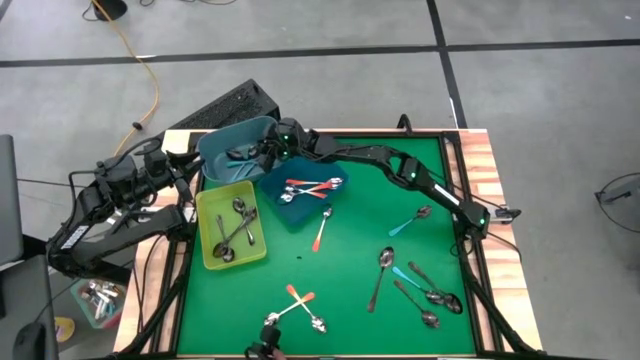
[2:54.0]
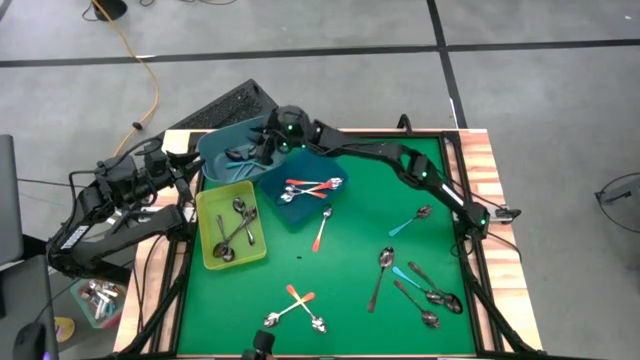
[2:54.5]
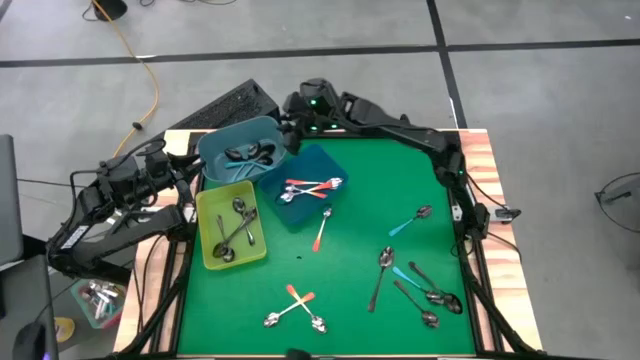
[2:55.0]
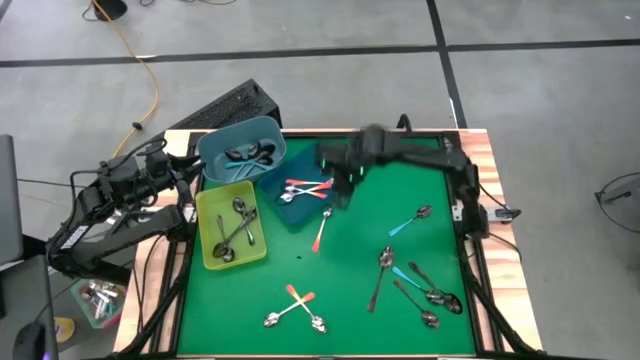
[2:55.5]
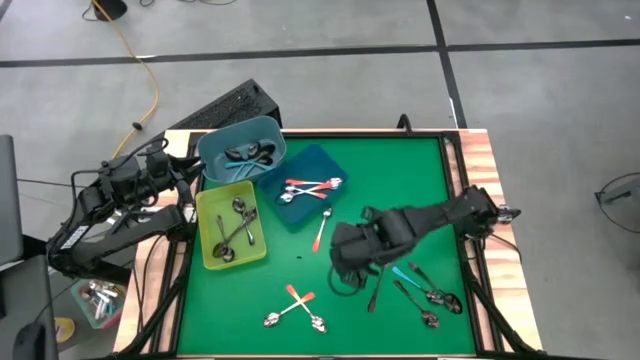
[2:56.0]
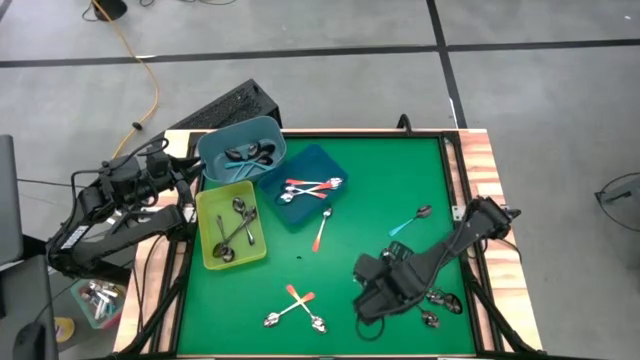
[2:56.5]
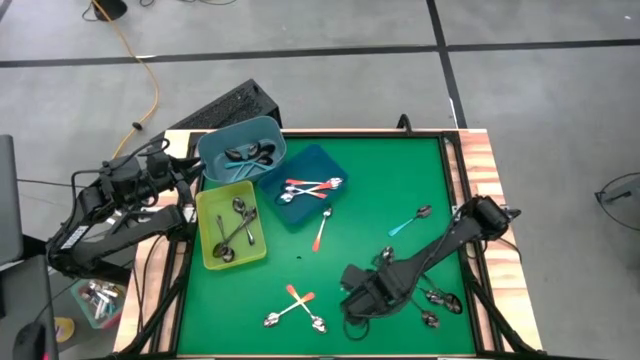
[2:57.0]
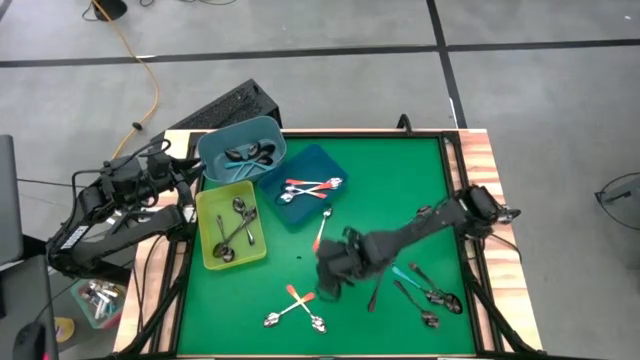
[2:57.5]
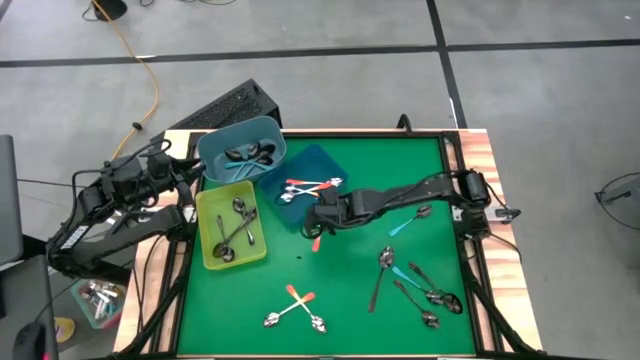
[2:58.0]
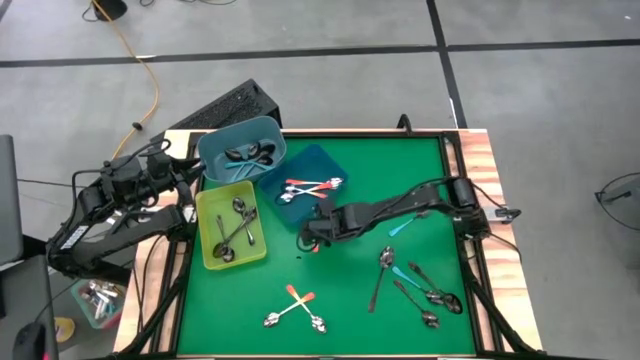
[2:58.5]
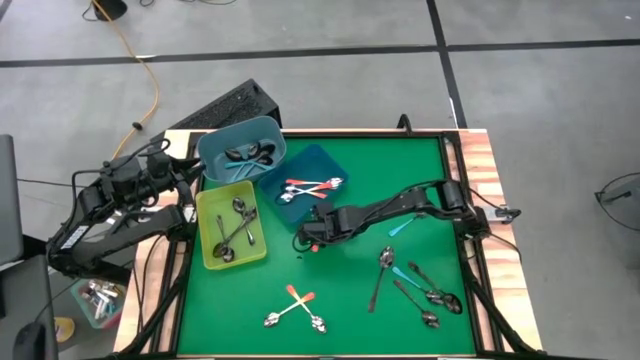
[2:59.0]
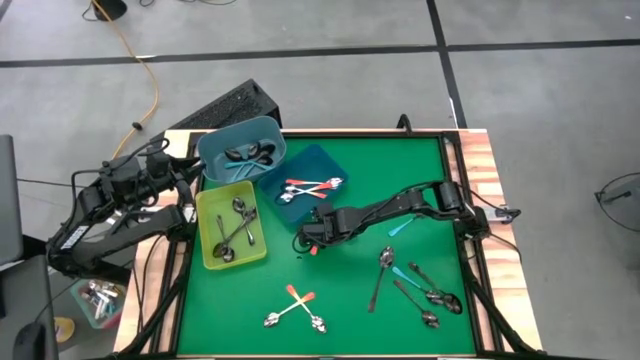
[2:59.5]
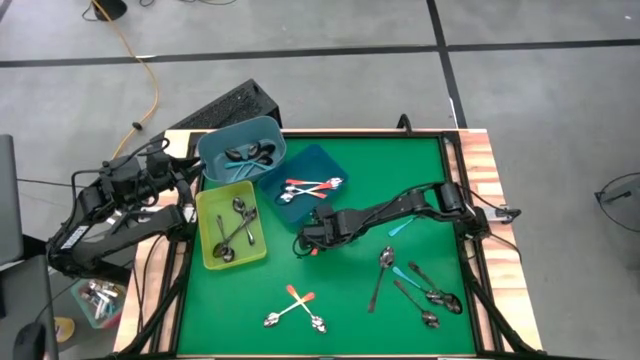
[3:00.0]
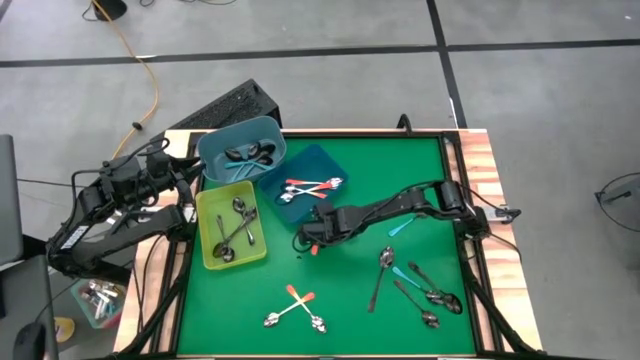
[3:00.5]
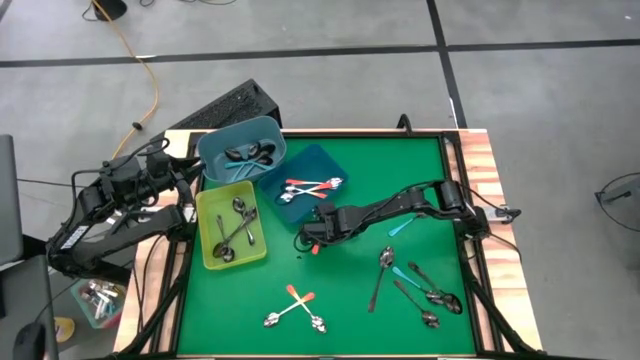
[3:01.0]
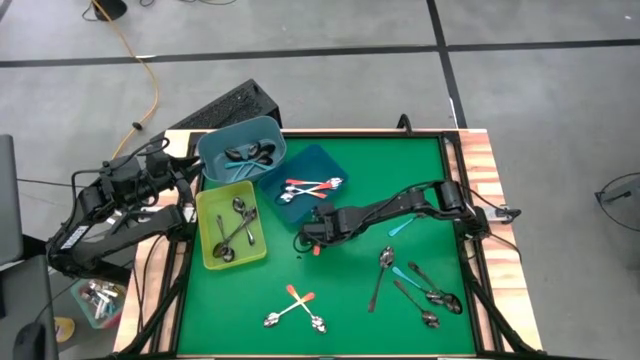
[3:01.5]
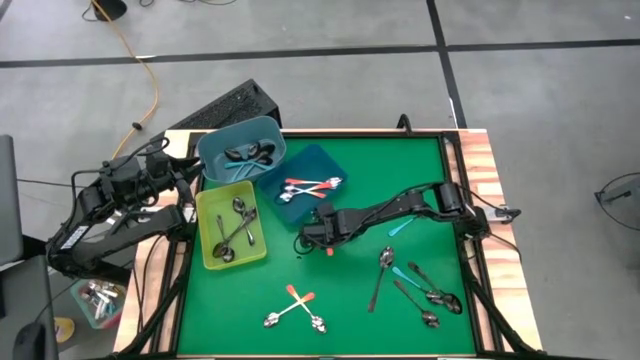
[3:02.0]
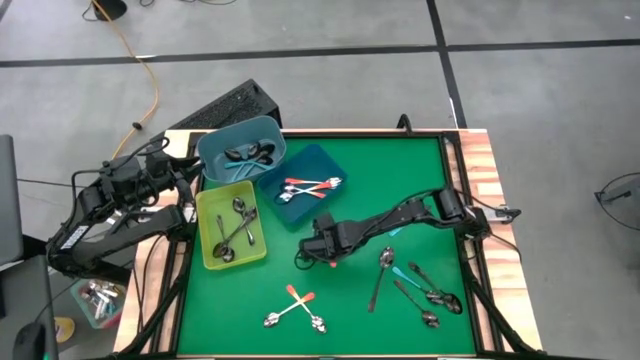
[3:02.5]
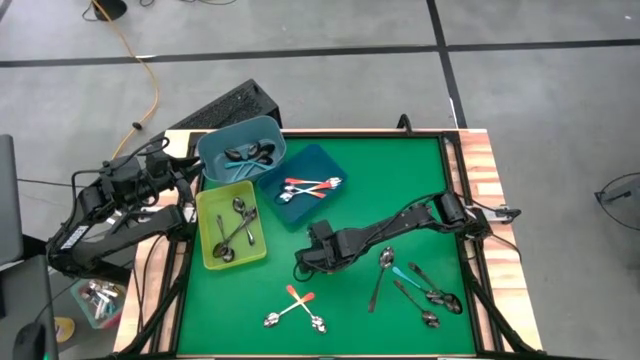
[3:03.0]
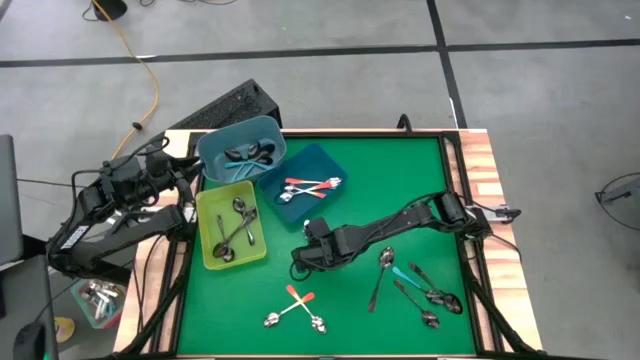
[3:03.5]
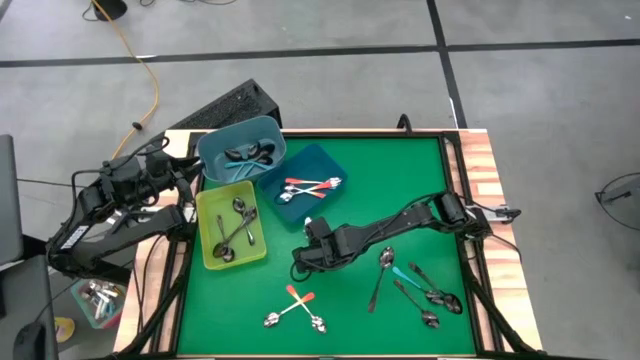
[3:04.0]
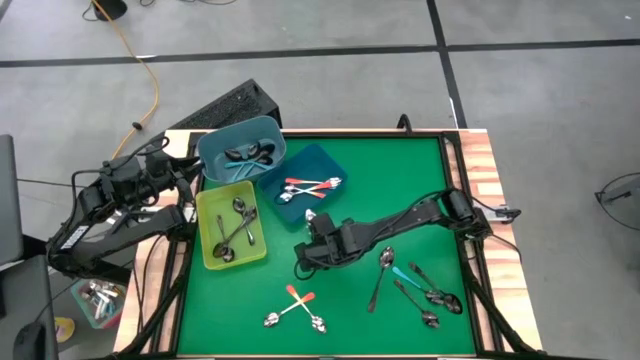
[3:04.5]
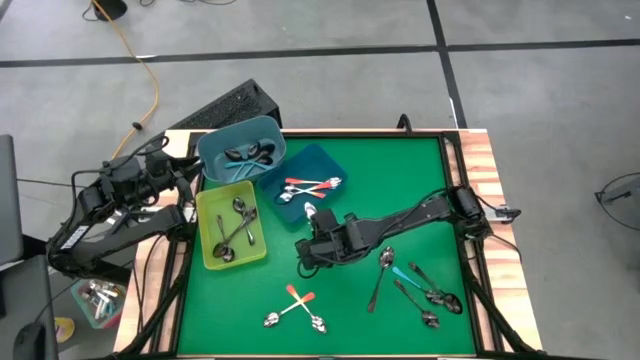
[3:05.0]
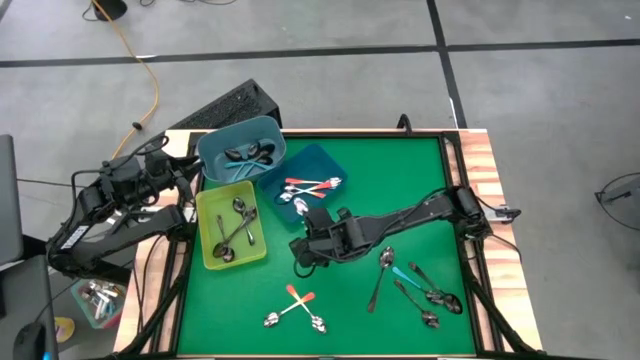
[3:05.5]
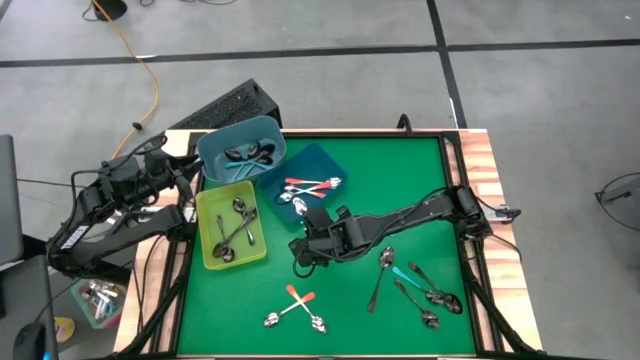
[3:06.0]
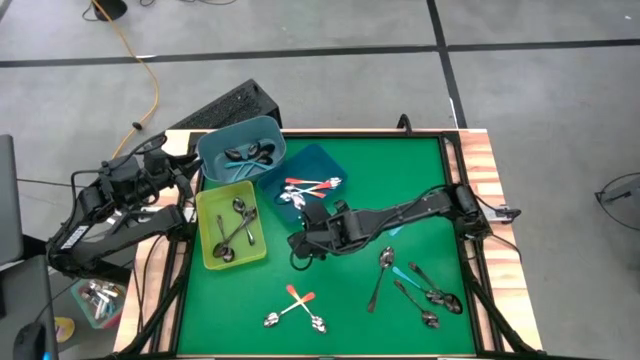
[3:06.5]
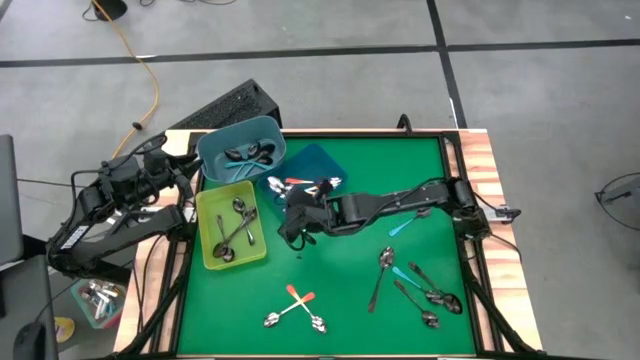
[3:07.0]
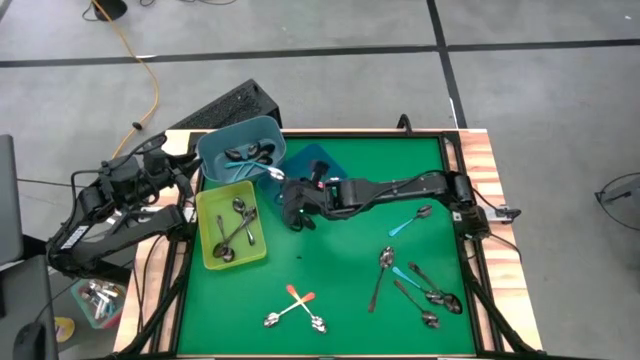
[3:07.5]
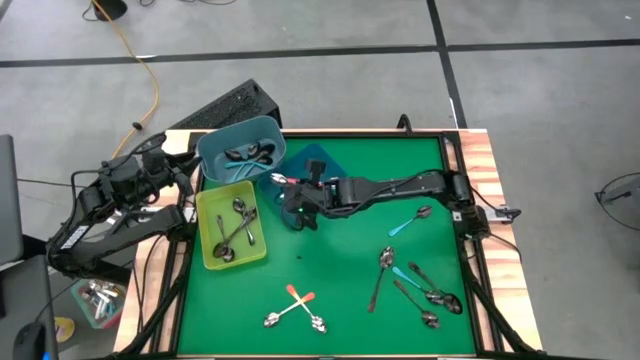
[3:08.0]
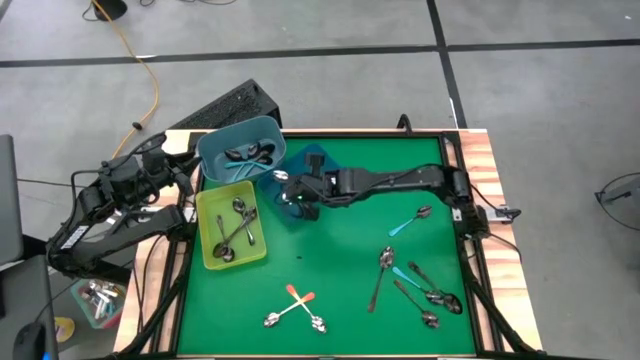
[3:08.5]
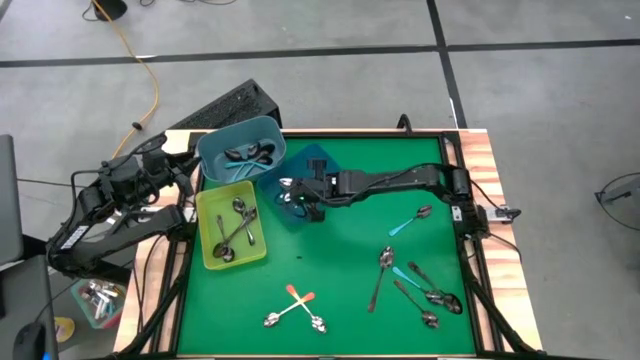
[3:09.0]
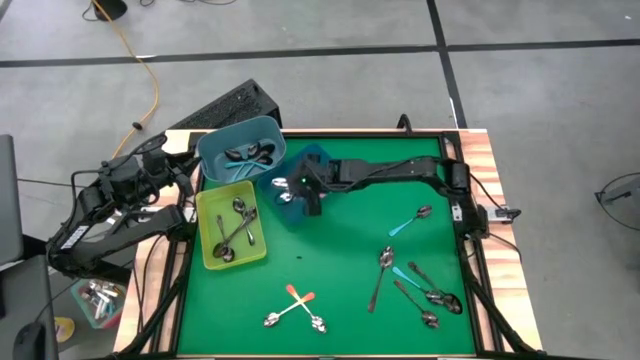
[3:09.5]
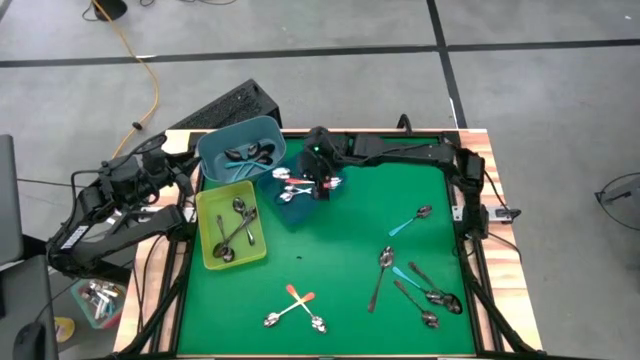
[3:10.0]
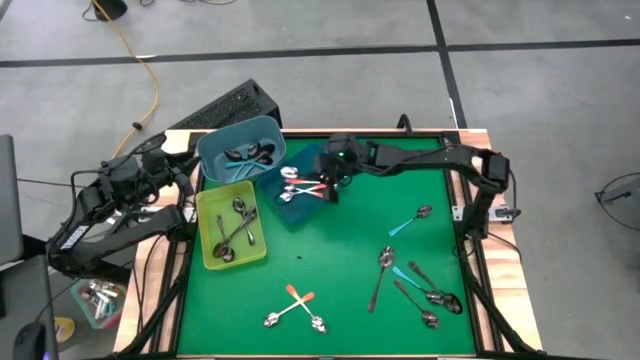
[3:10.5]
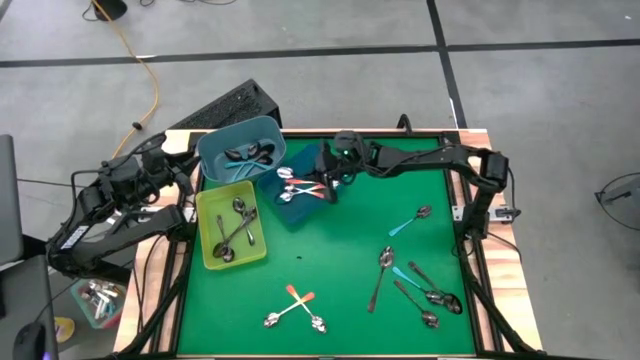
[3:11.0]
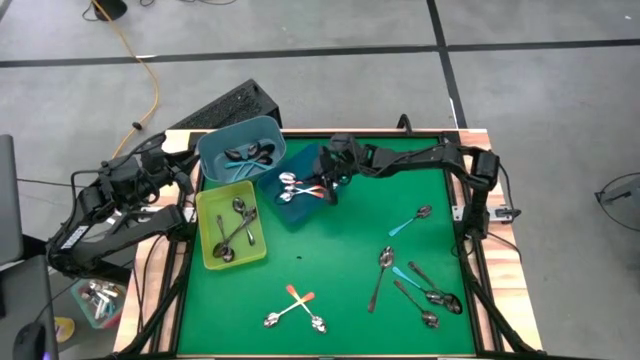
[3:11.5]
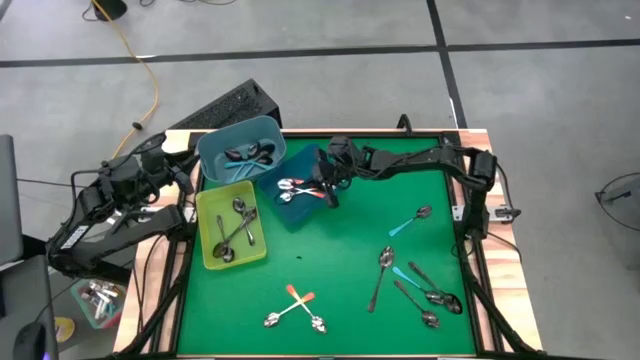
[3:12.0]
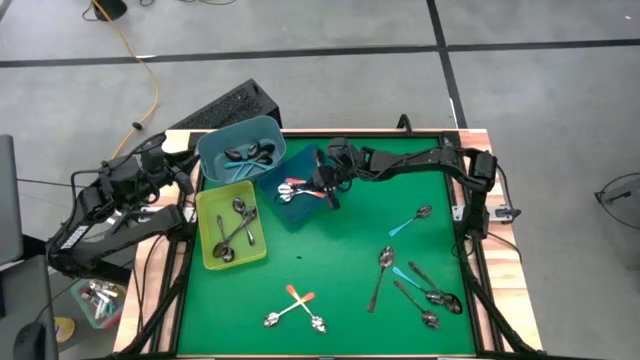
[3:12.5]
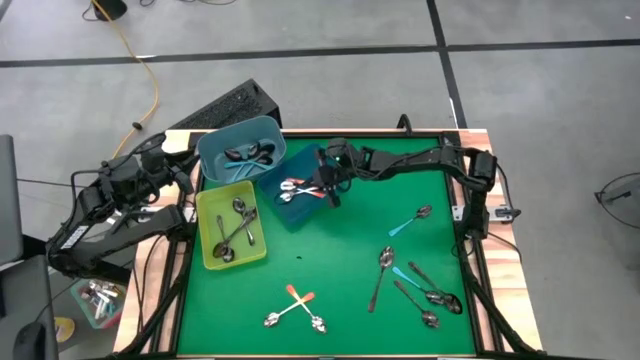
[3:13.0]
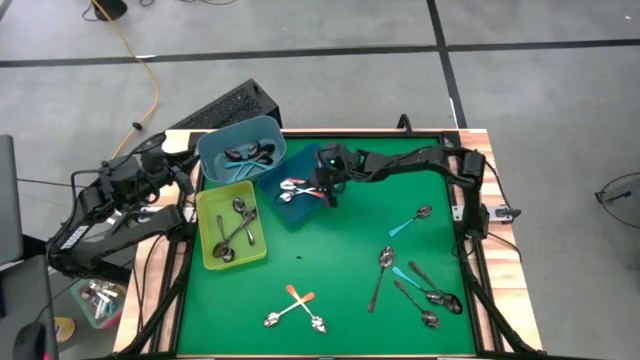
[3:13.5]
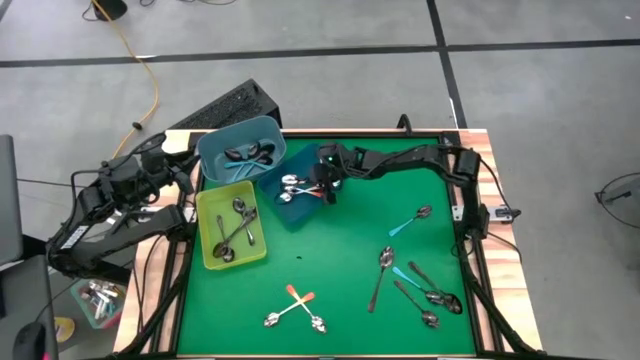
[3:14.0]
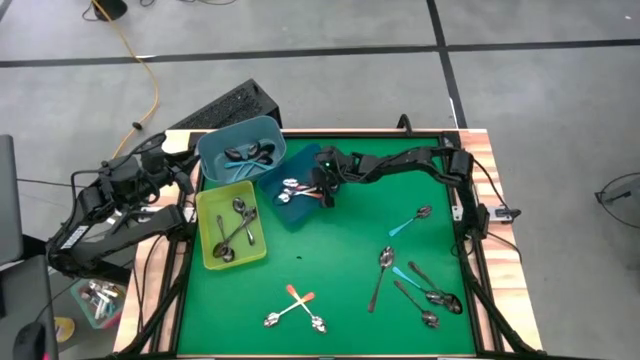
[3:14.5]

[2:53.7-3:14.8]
Task: Sort silverware by color (type)
Put the orange spoon into the blue bin
